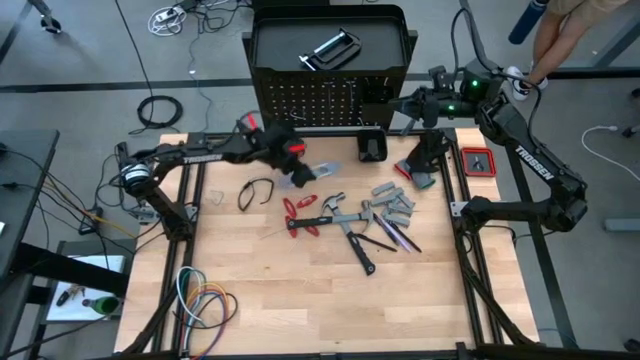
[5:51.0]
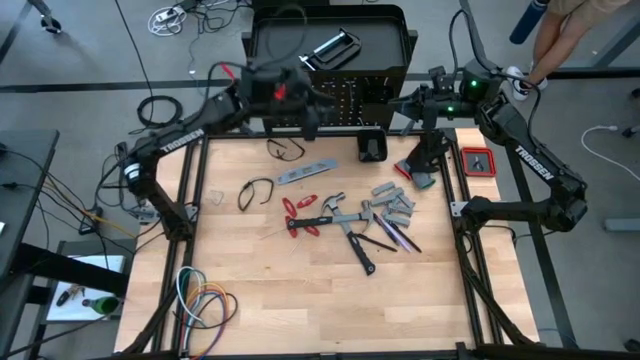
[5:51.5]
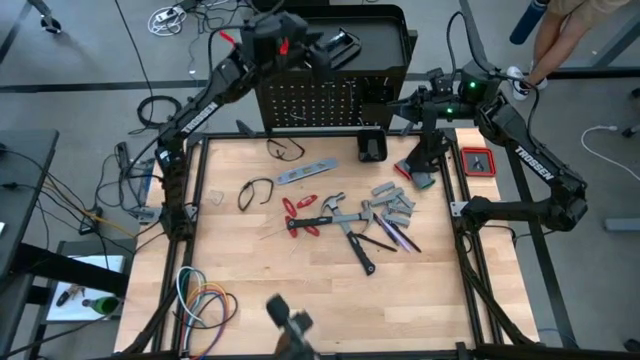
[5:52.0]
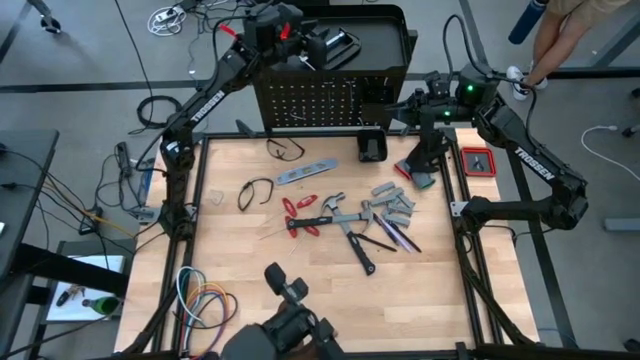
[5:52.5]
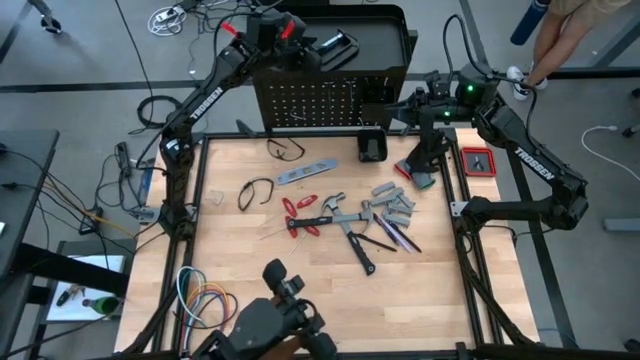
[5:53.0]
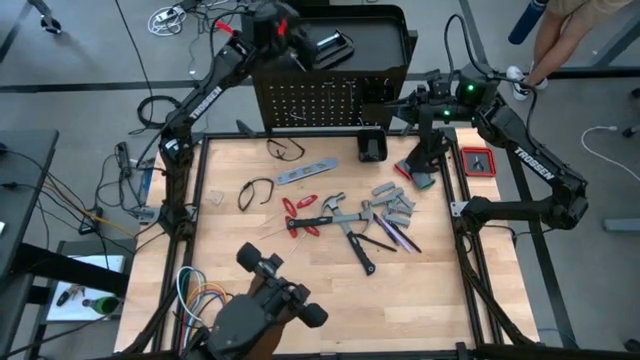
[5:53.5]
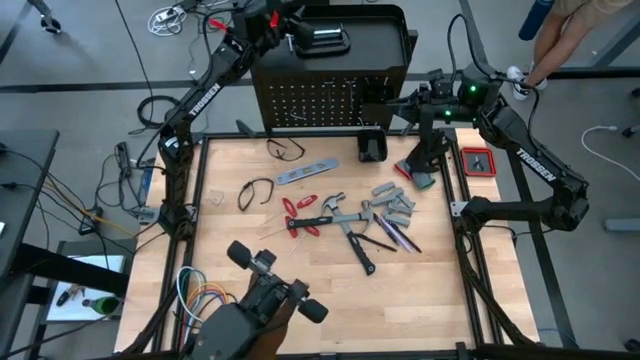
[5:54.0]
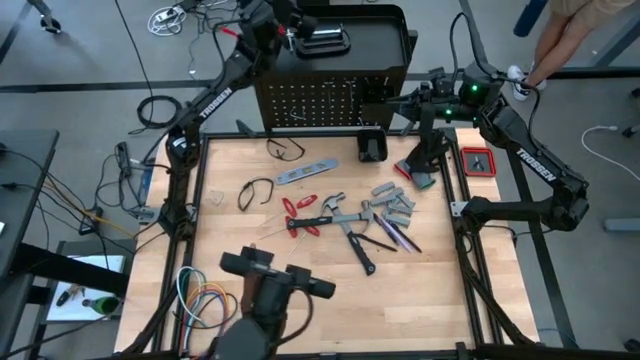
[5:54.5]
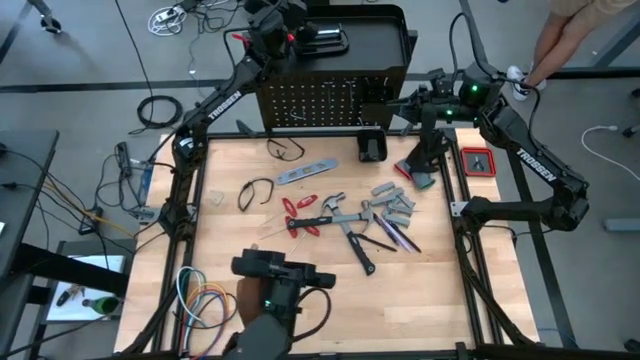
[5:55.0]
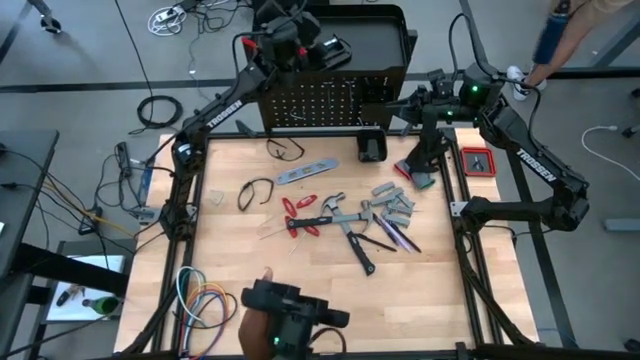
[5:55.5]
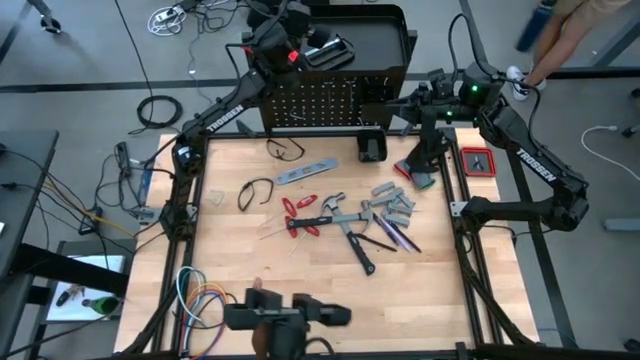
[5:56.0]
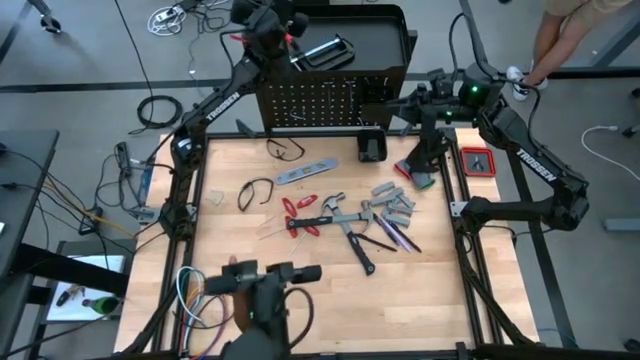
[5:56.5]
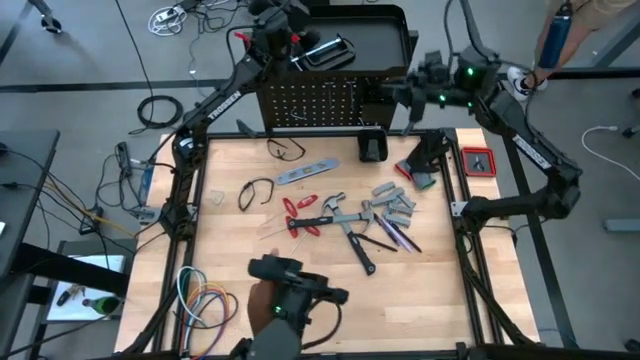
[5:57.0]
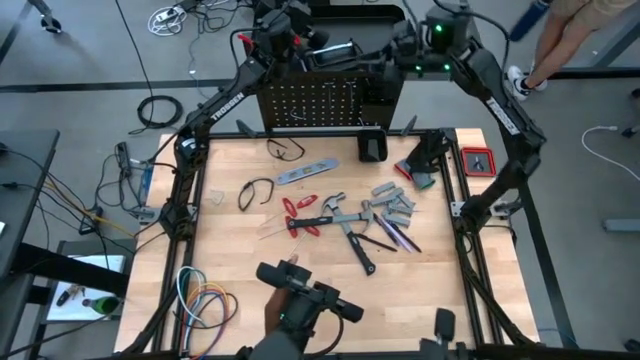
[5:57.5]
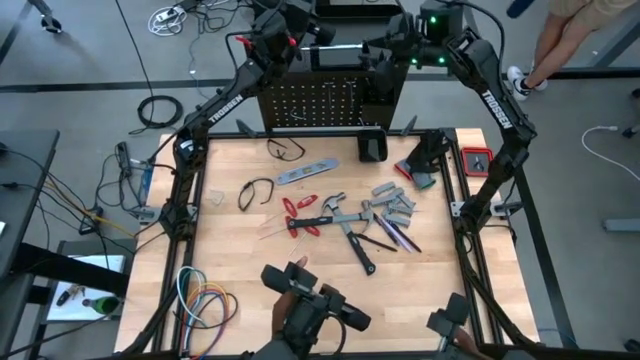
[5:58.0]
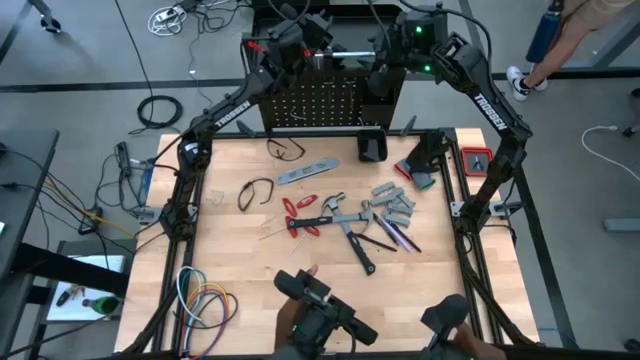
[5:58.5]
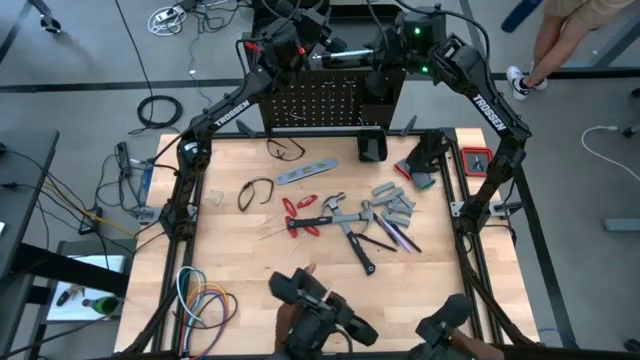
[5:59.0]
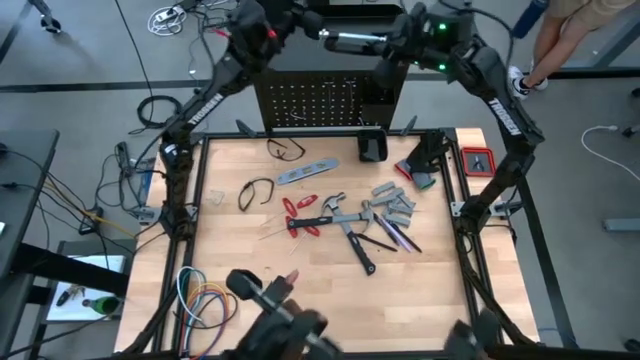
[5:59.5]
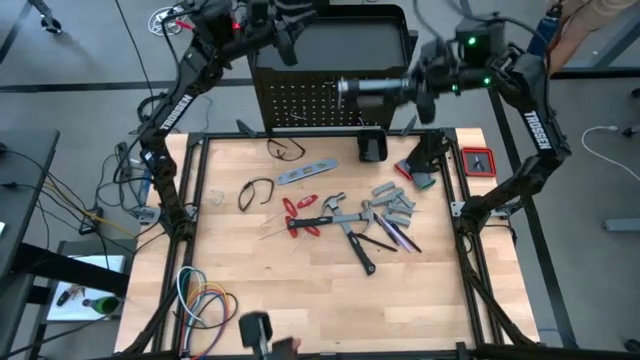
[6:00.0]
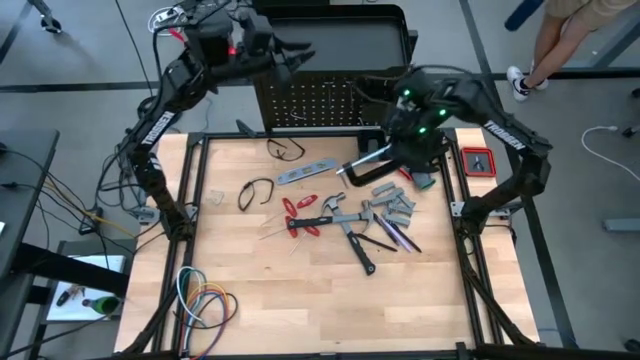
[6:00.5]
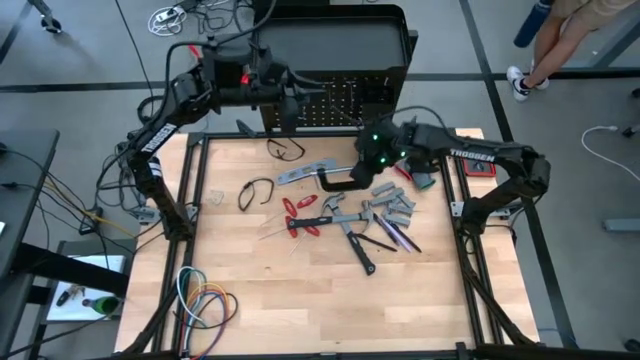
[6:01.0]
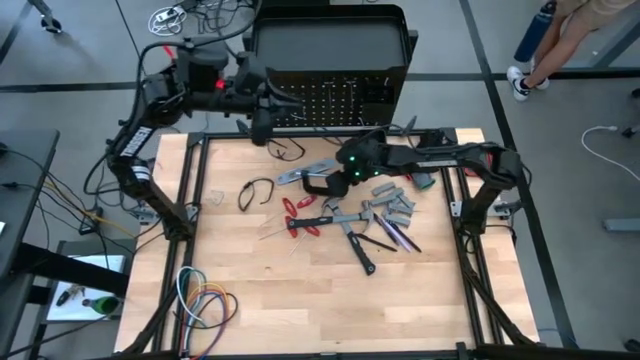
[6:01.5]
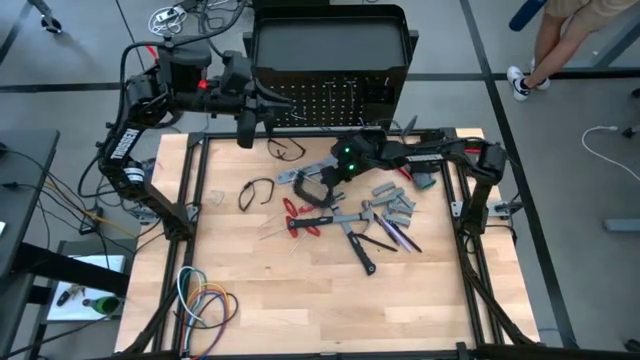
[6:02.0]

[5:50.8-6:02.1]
Task: Hang tools onto peg board
Remove the clamp from the top of the peg board

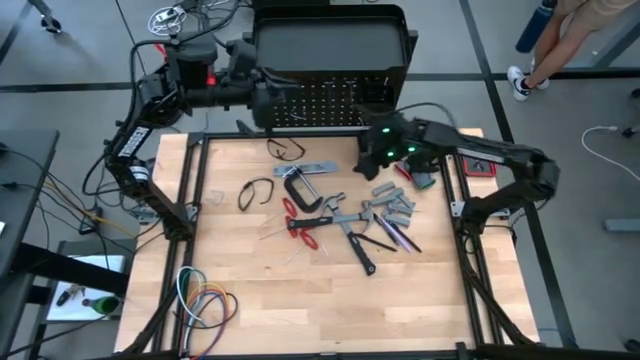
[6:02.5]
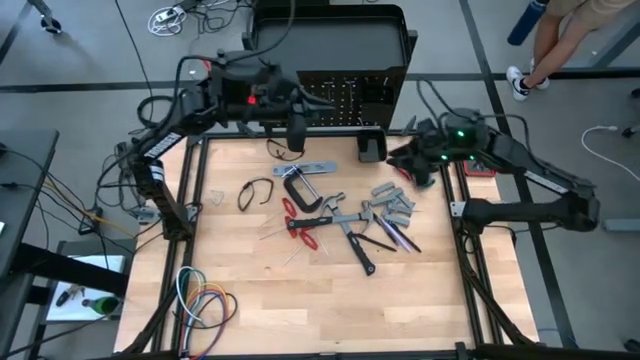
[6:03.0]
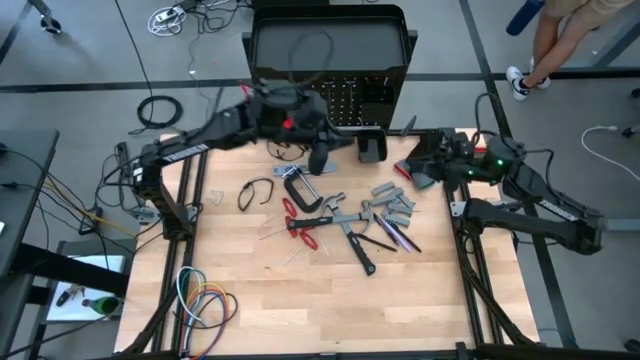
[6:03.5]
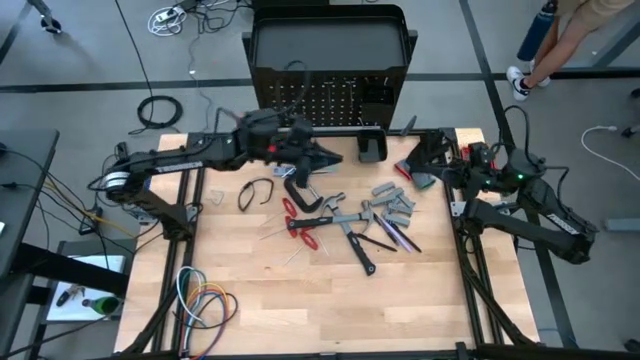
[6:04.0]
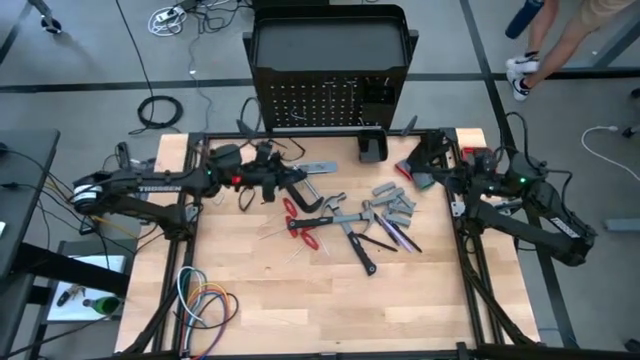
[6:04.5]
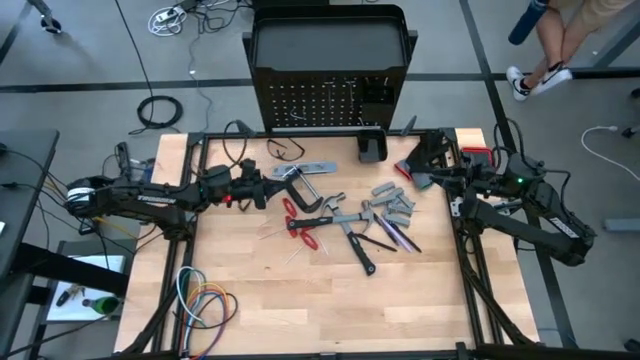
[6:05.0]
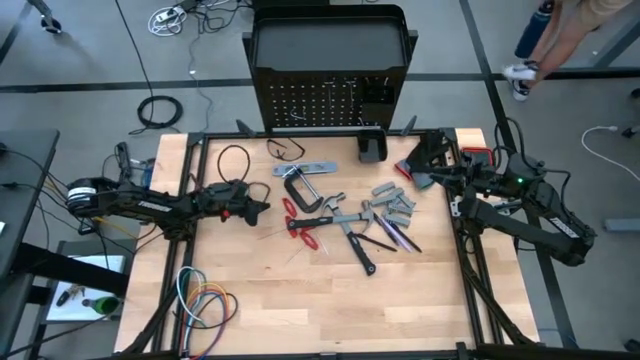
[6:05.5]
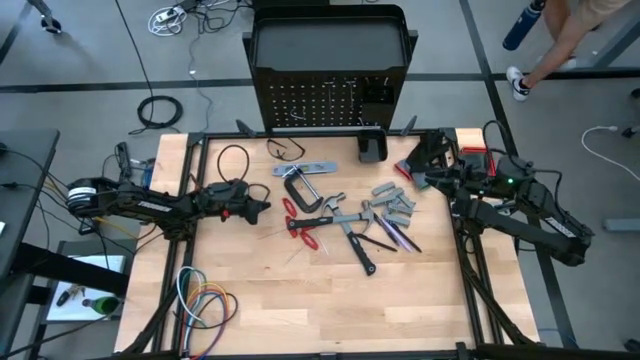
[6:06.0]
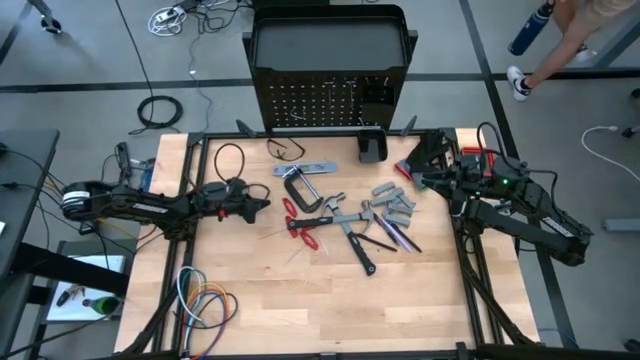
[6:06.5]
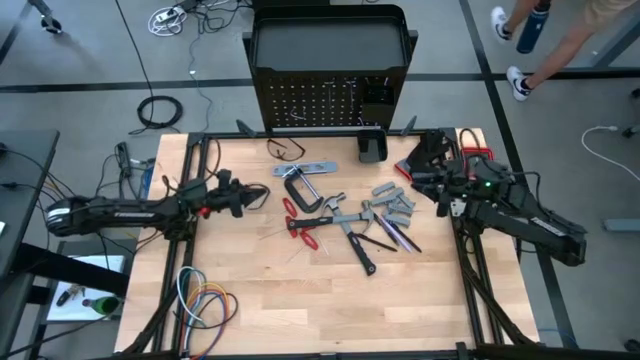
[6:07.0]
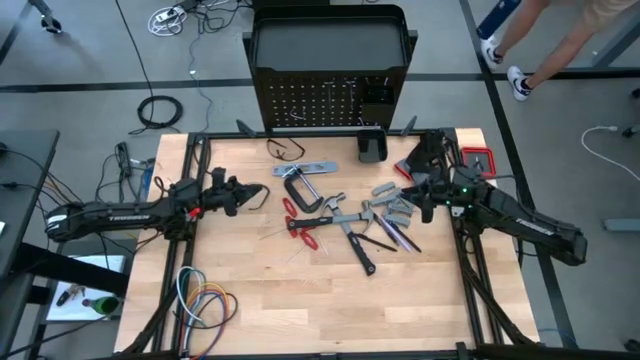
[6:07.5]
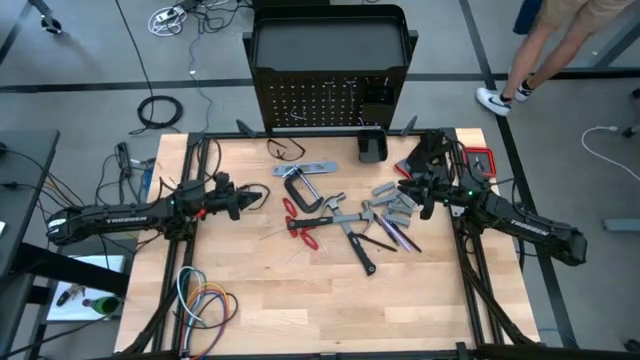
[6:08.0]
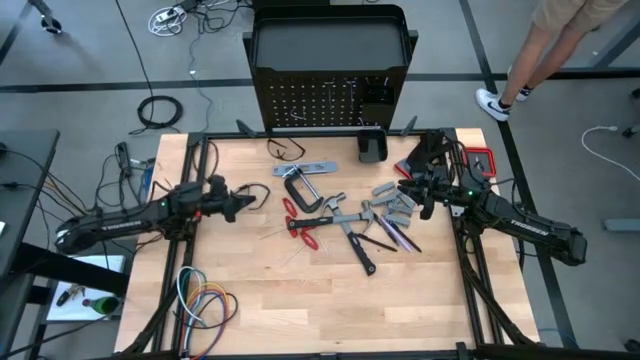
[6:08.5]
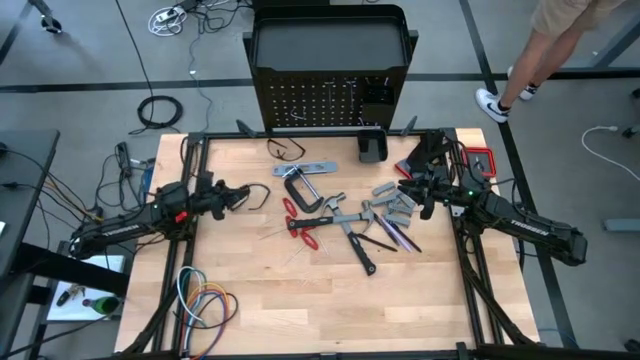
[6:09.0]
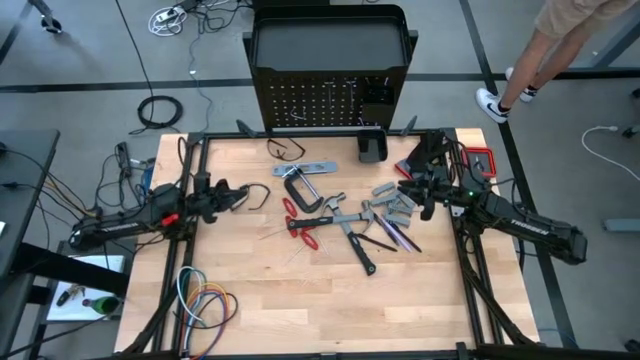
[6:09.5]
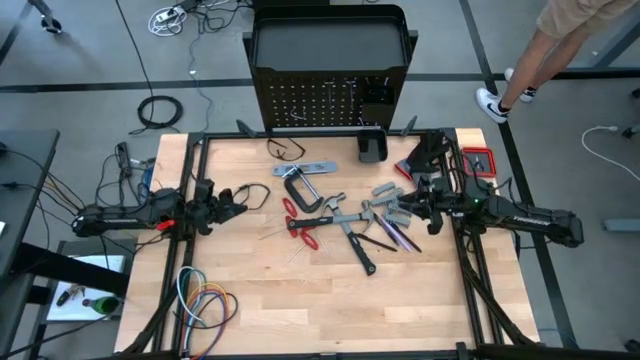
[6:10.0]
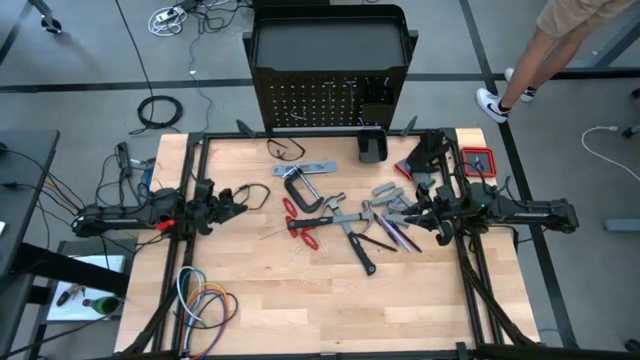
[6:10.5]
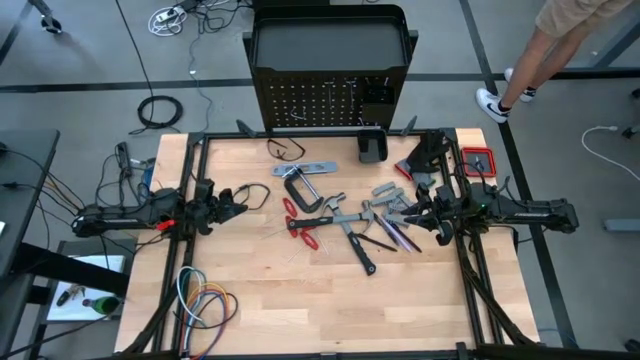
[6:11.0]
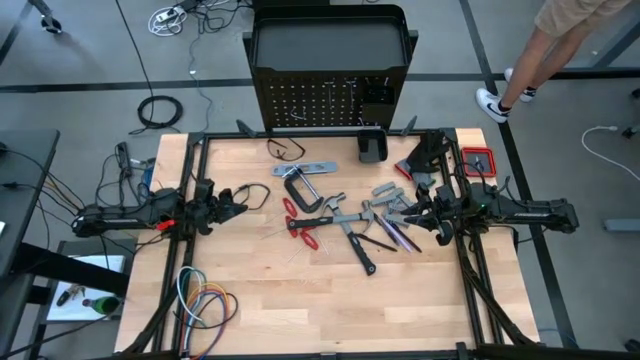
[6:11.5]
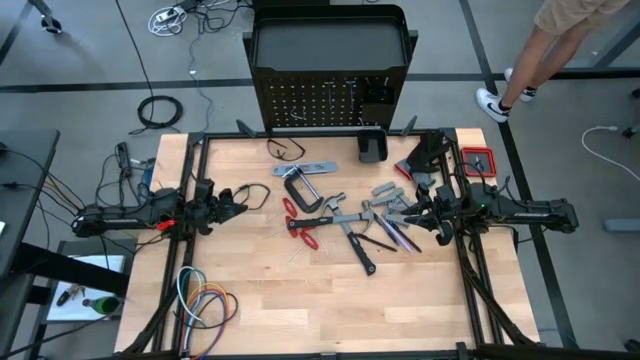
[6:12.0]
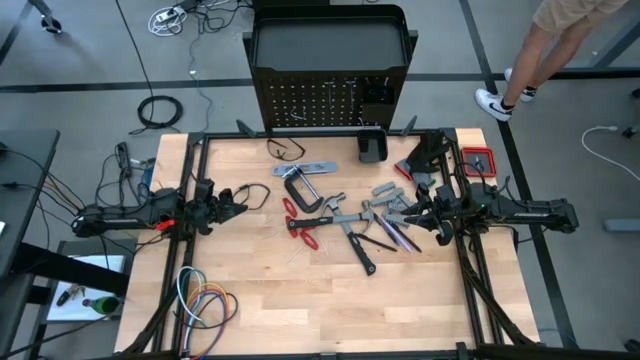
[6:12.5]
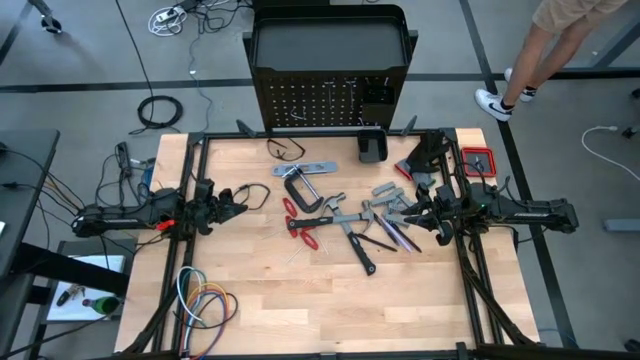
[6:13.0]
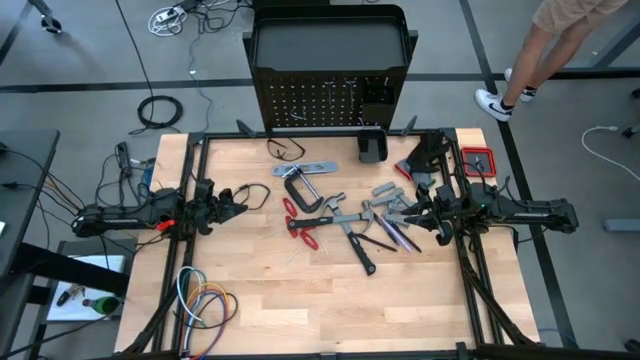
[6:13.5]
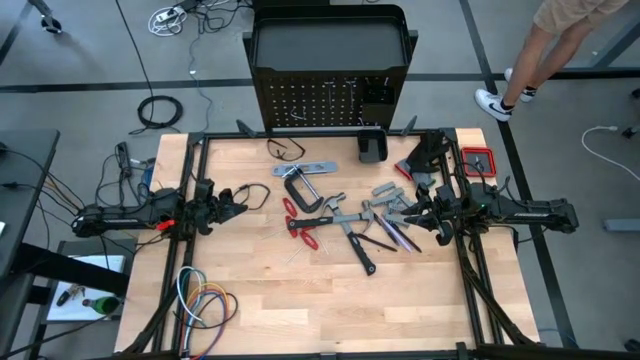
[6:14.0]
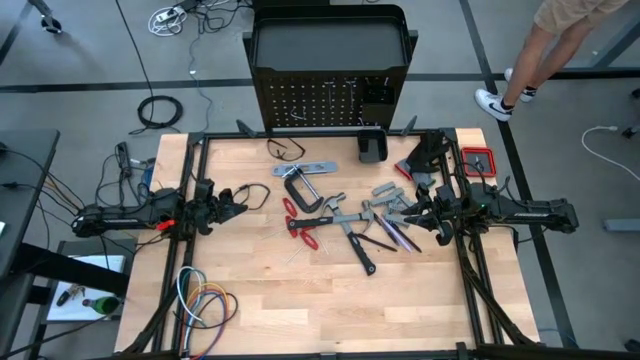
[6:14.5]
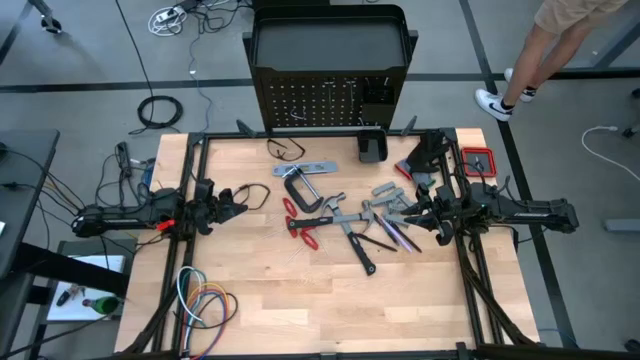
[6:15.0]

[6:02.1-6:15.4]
Return to Home Position
